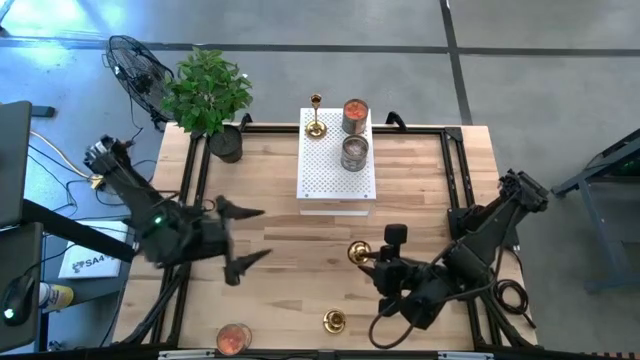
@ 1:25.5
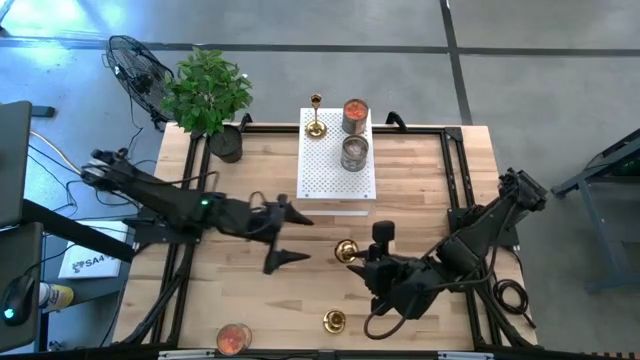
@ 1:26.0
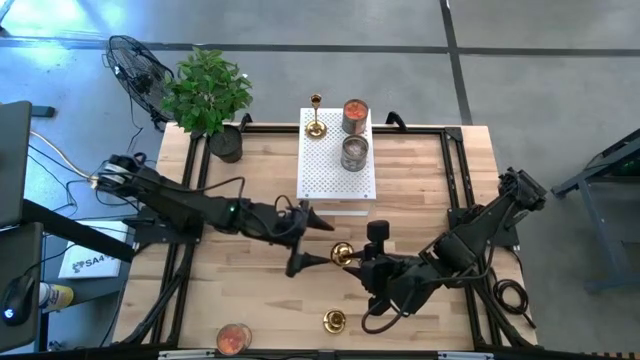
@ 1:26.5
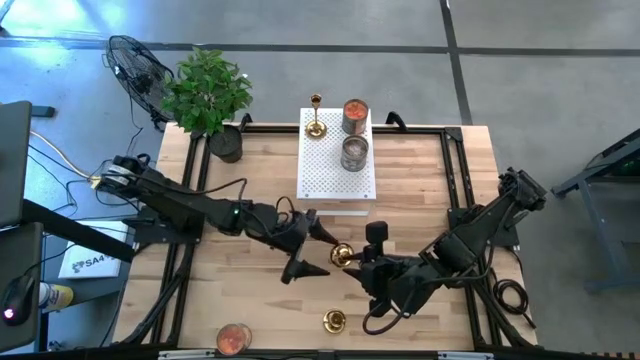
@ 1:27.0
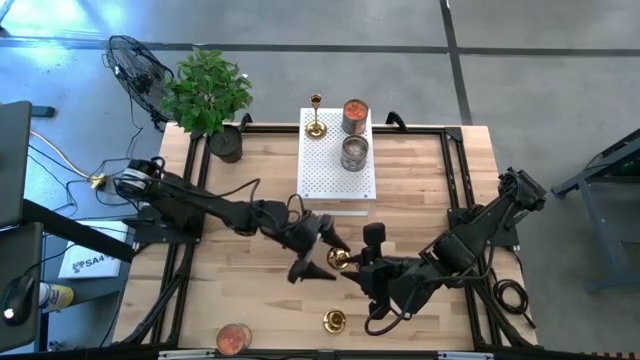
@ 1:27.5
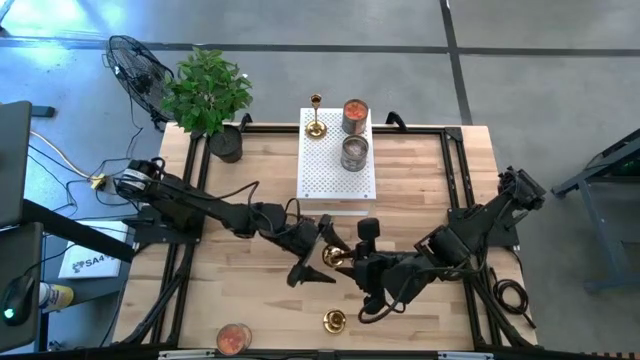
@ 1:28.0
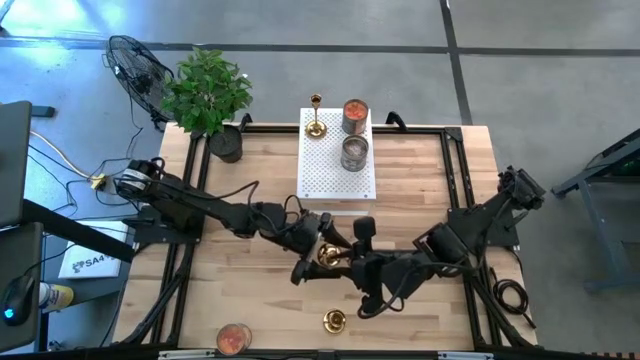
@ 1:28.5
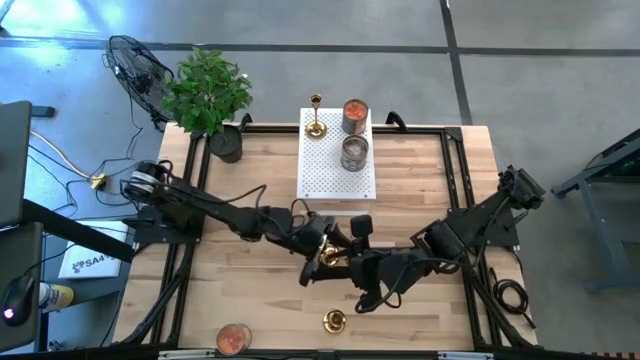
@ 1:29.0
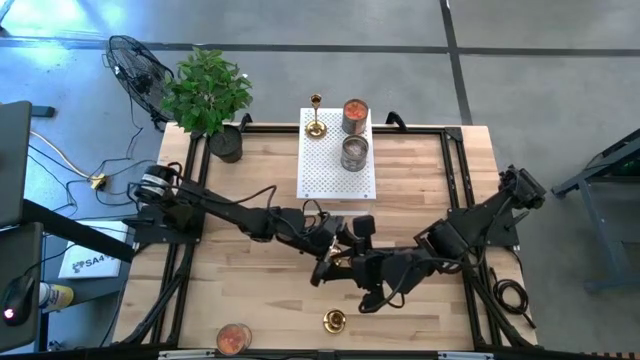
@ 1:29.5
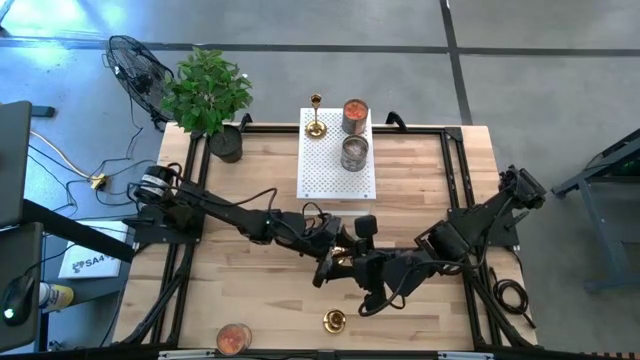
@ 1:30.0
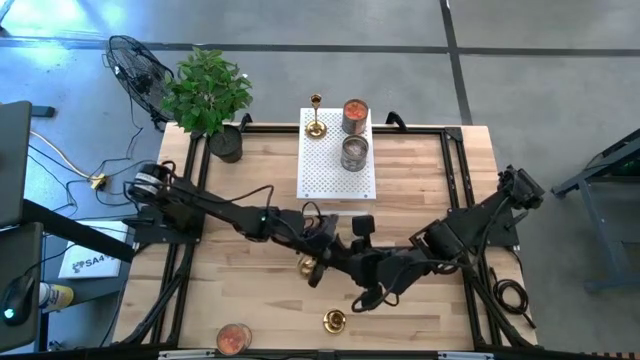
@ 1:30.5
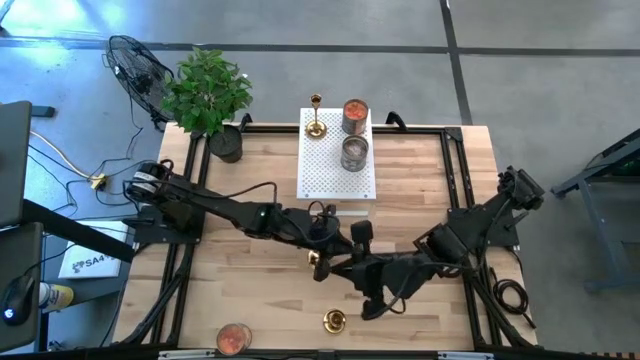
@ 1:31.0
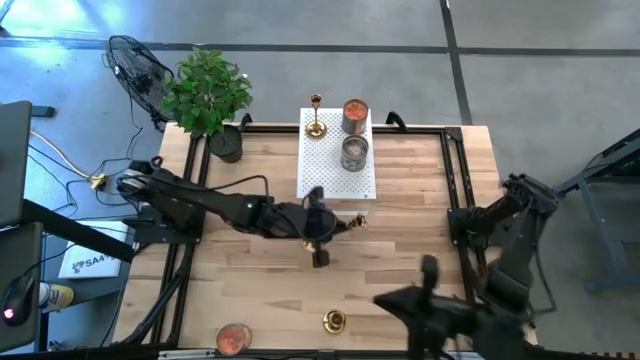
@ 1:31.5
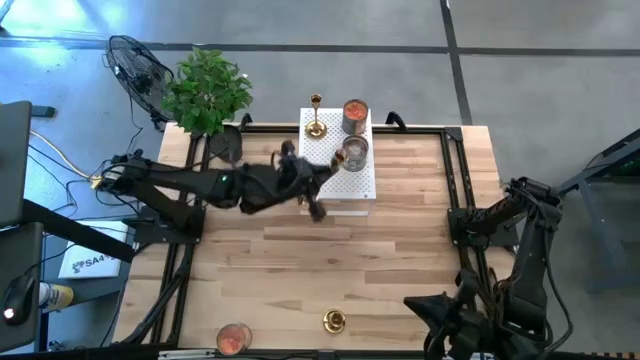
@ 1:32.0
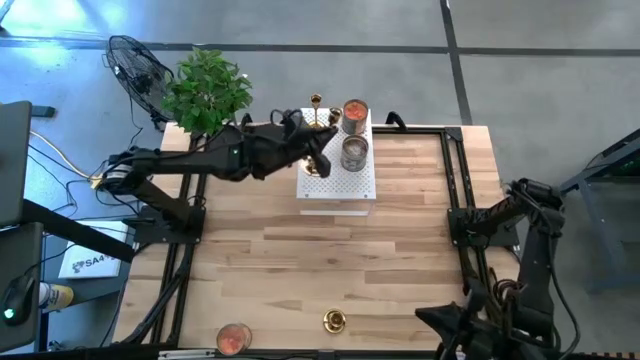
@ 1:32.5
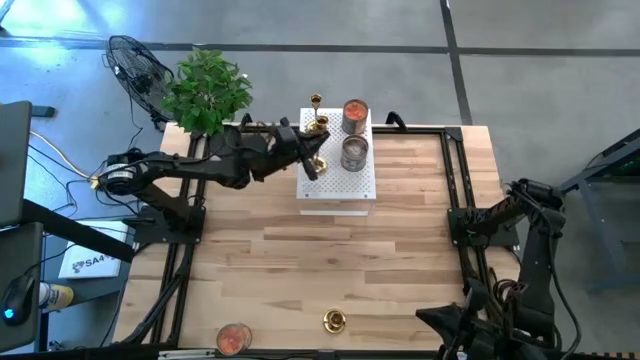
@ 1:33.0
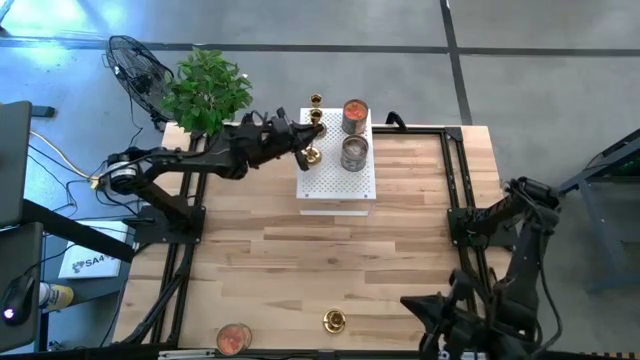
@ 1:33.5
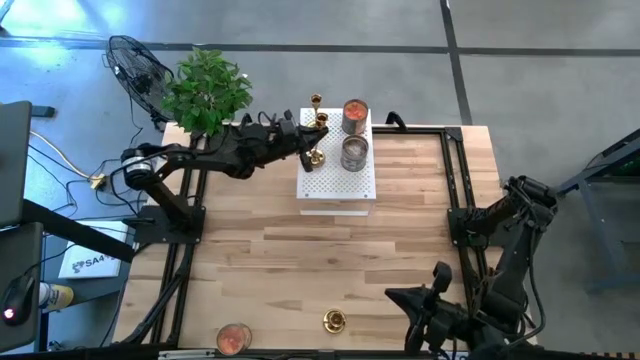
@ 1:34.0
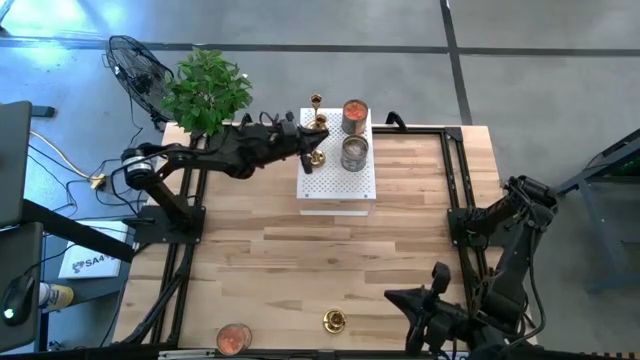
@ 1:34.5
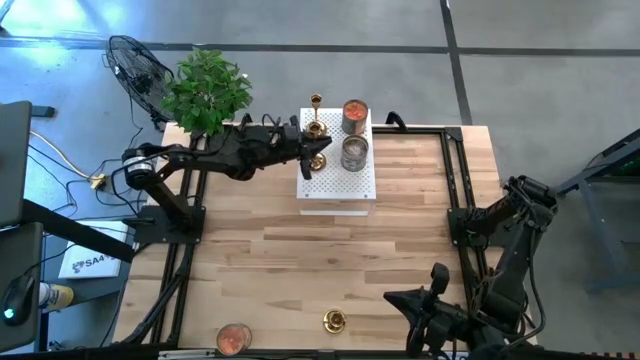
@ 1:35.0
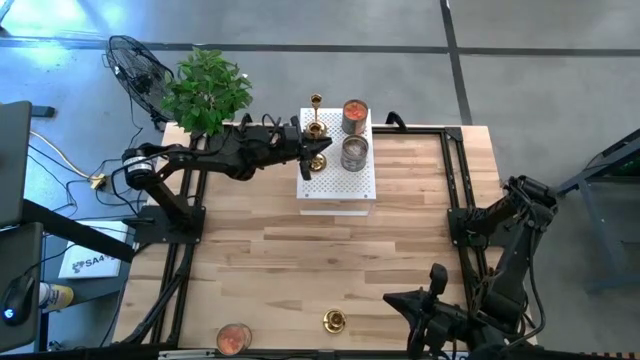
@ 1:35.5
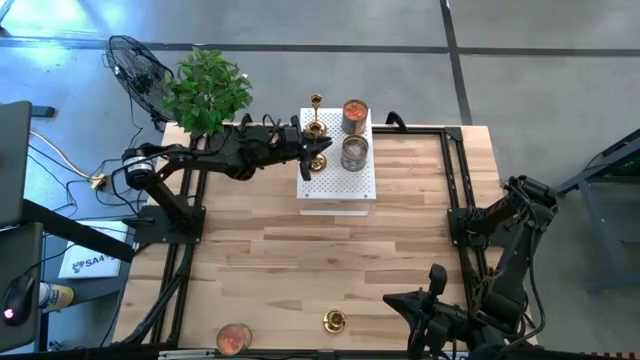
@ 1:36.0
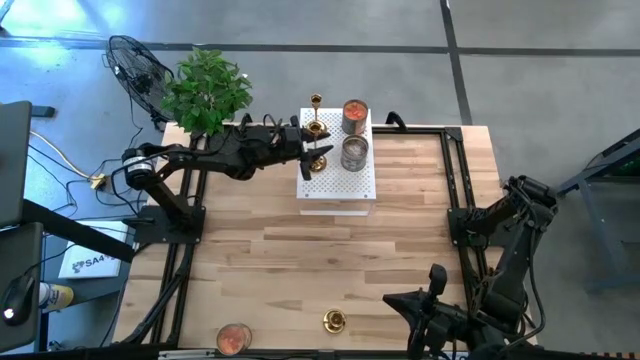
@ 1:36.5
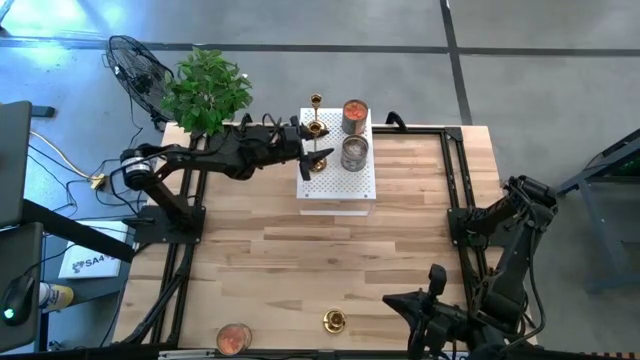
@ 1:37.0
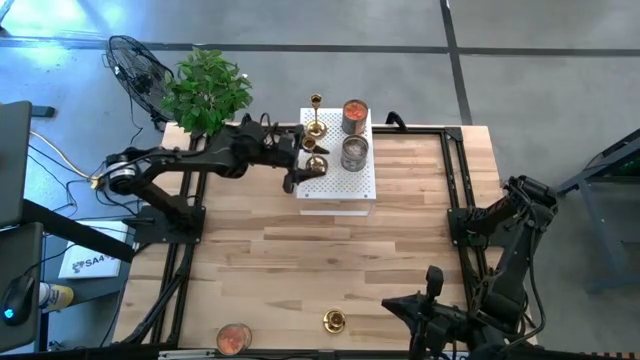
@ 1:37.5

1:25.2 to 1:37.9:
Task: Pick & Place candle stick holders
Put the top gold candle holder on the shelf

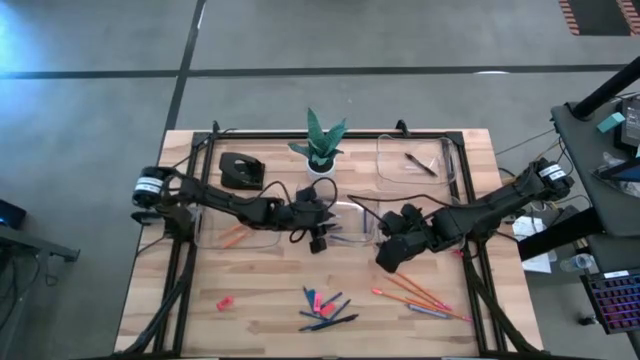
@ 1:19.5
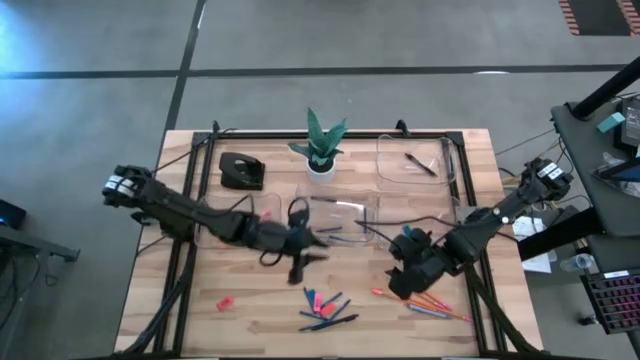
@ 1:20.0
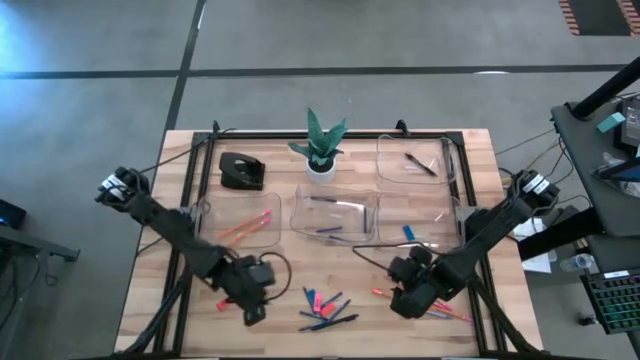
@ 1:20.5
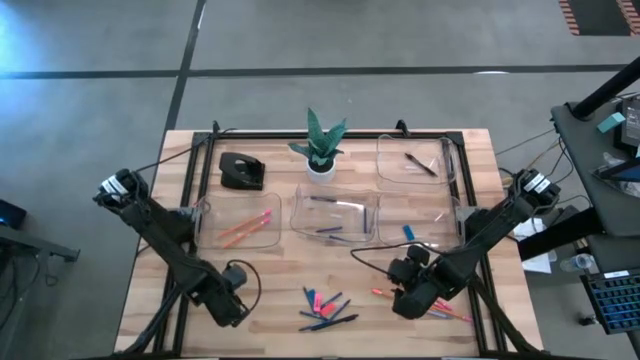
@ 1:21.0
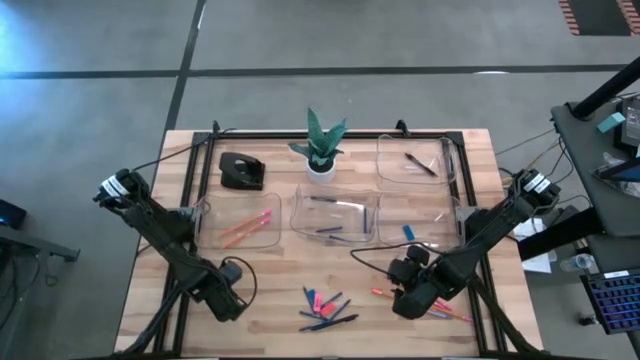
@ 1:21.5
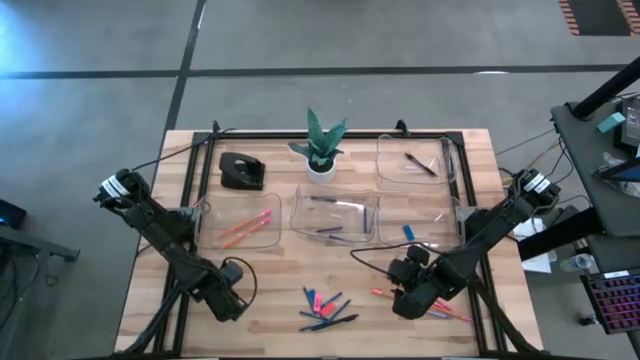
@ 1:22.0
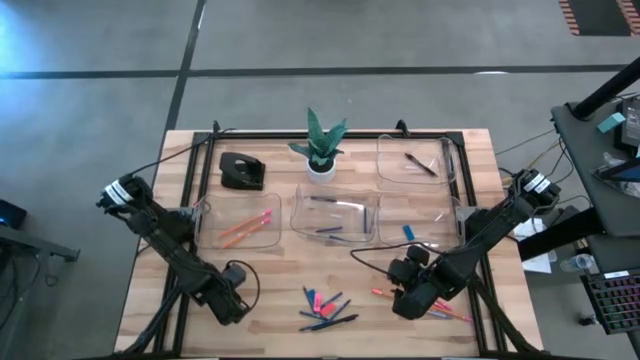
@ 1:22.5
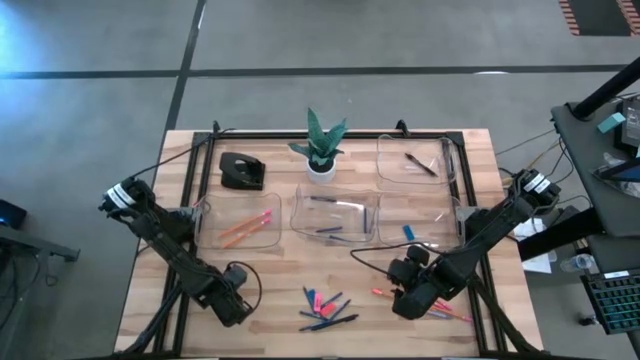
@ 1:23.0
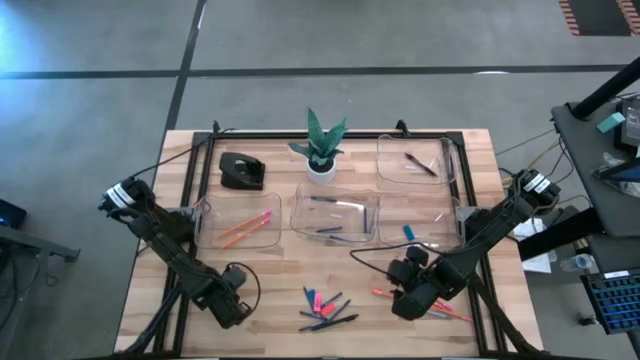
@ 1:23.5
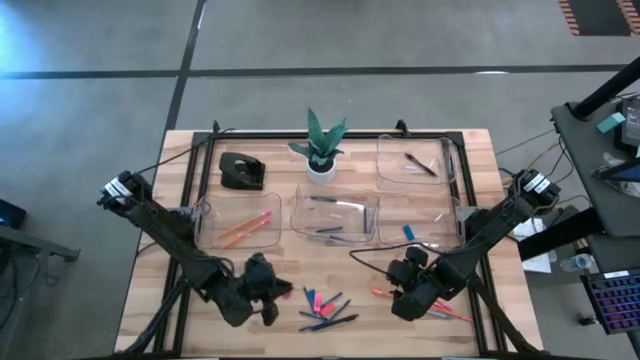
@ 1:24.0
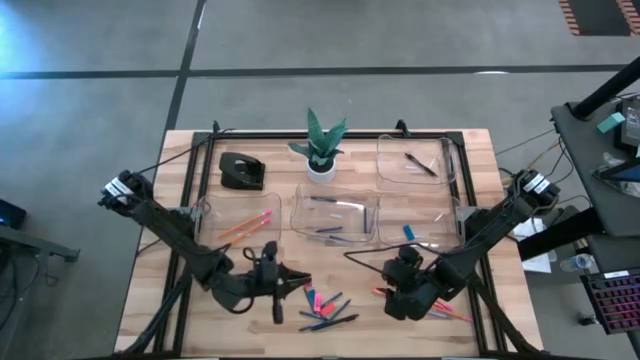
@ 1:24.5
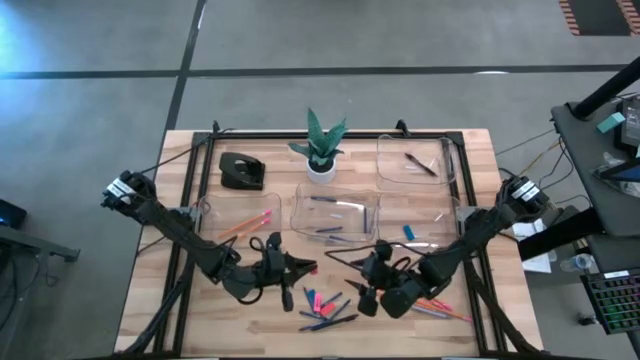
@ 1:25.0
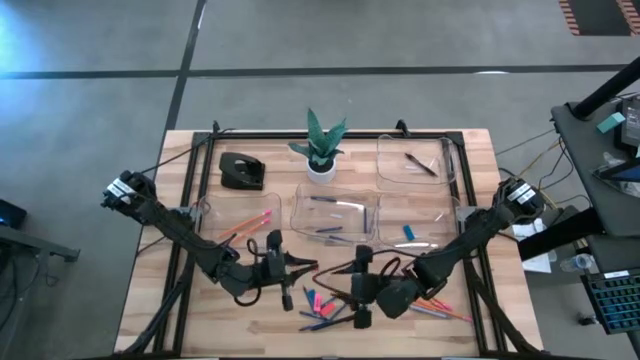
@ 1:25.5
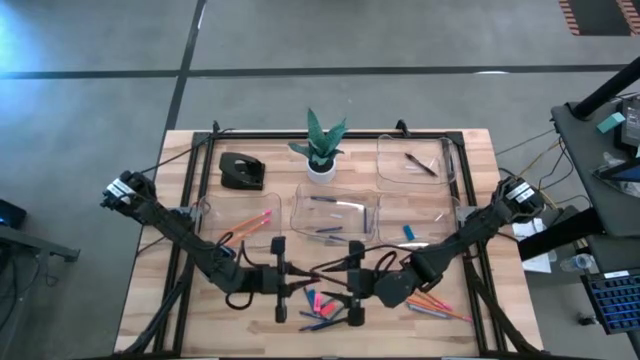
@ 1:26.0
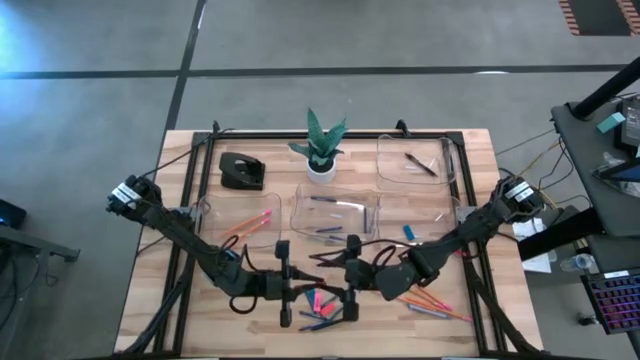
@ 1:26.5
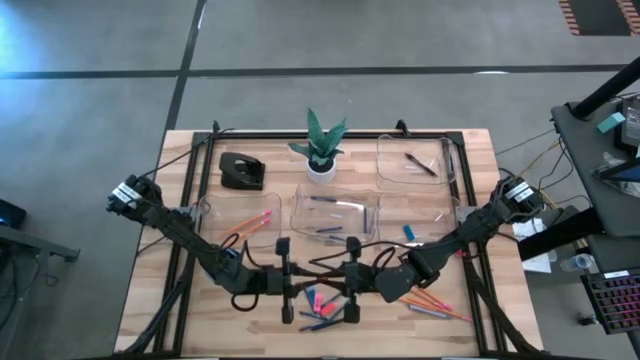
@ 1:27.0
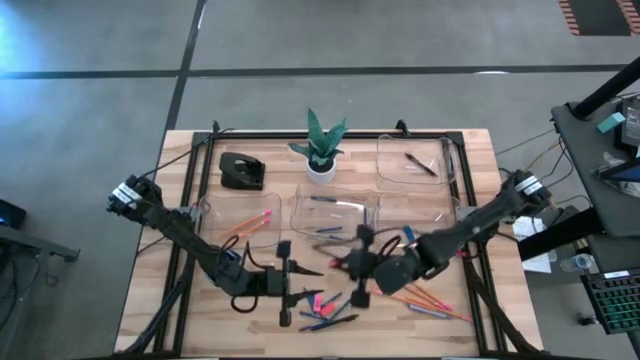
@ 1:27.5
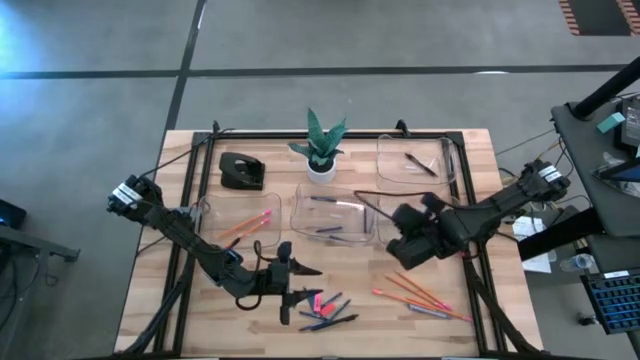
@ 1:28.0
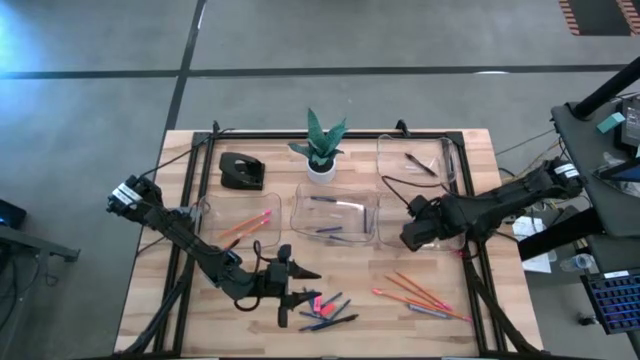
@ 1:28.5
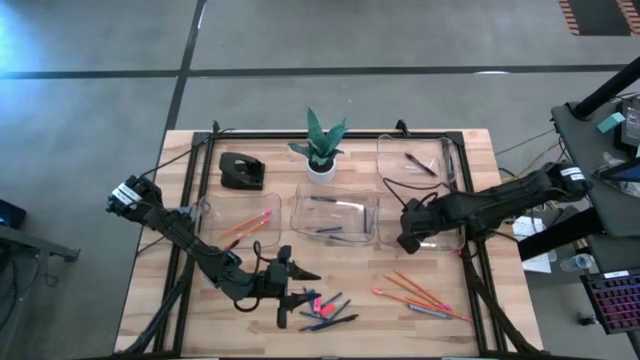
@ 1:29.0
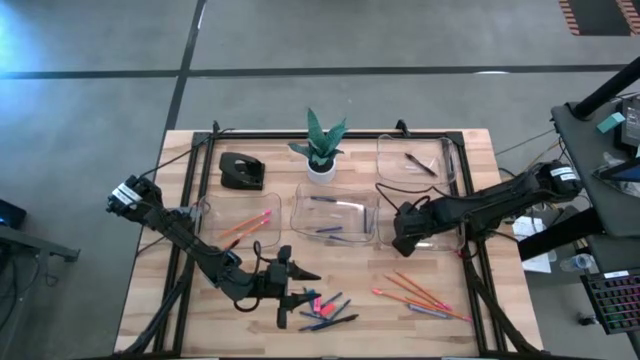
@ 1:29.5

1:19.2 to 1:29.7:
Task: Sort crayons/erasers/pens/pencils in bins
Put the orange eraser into the middle right transparent bin
